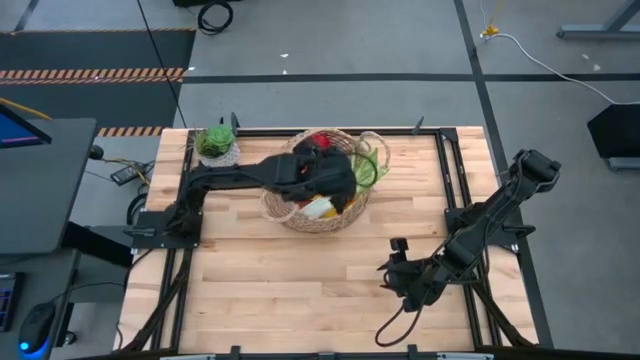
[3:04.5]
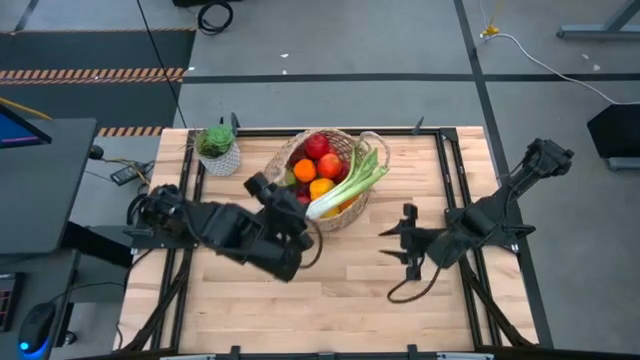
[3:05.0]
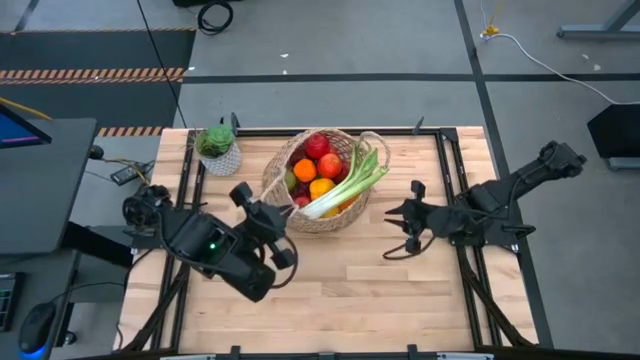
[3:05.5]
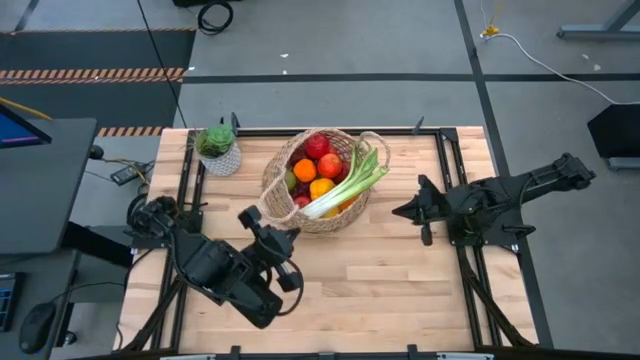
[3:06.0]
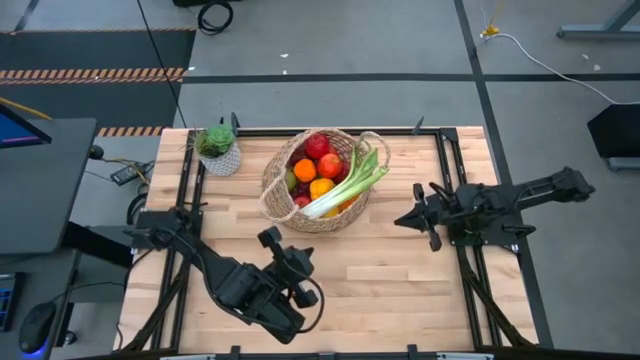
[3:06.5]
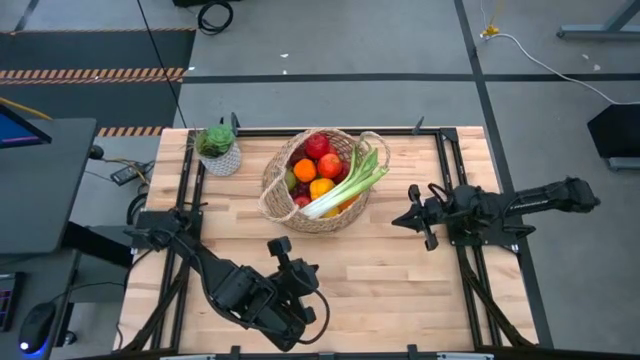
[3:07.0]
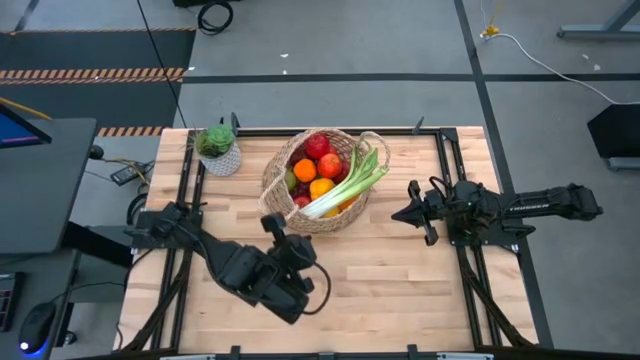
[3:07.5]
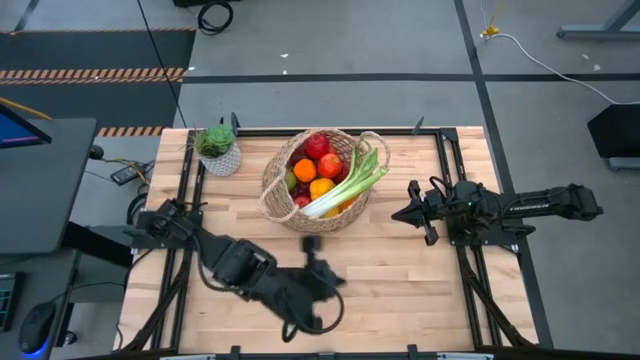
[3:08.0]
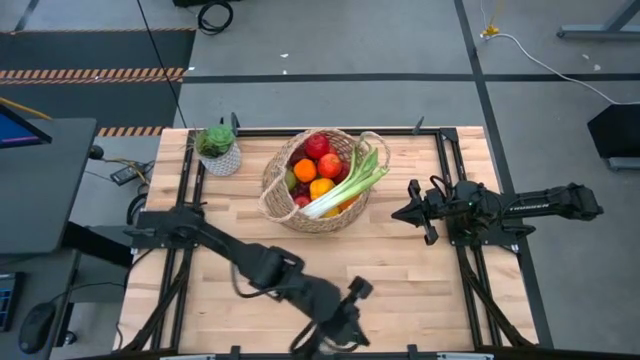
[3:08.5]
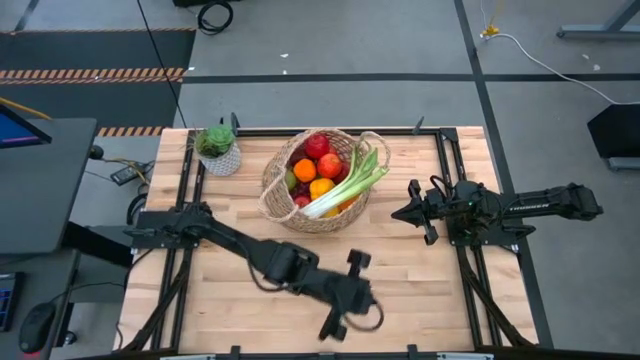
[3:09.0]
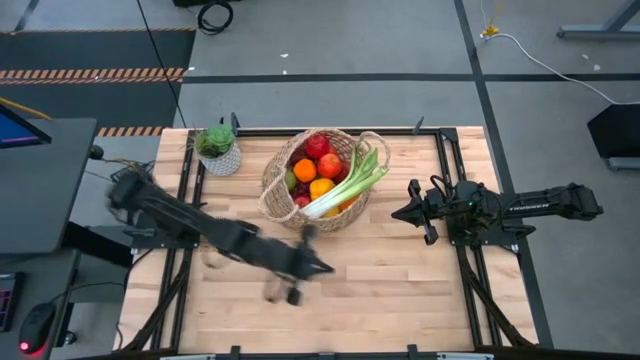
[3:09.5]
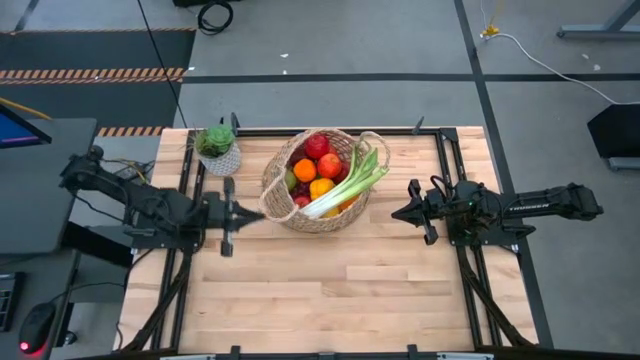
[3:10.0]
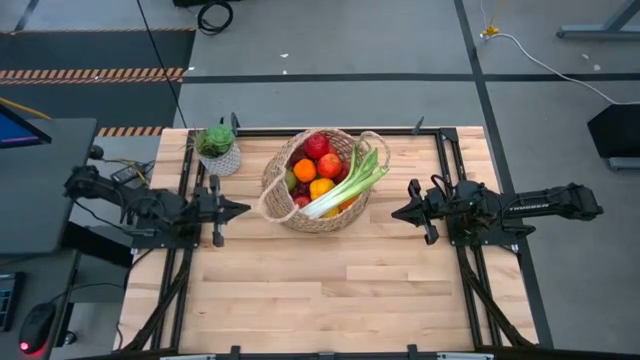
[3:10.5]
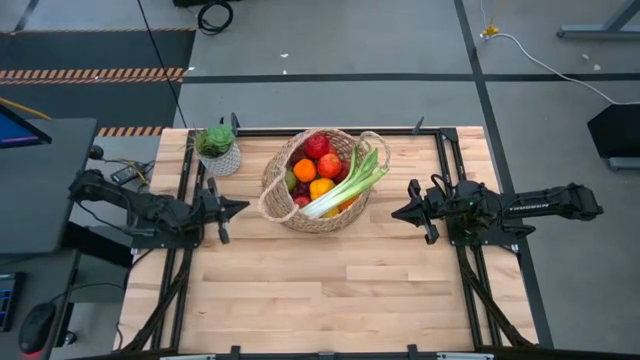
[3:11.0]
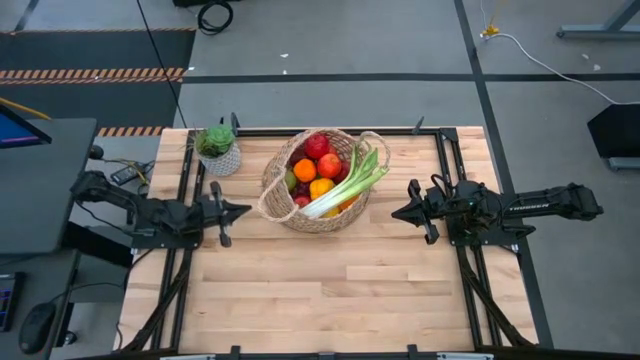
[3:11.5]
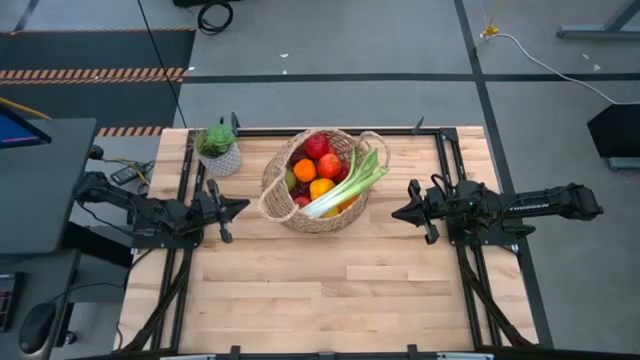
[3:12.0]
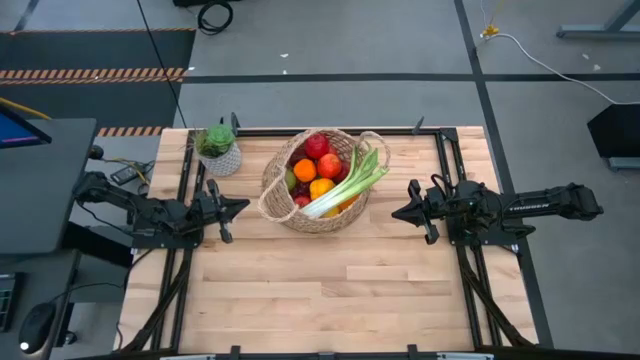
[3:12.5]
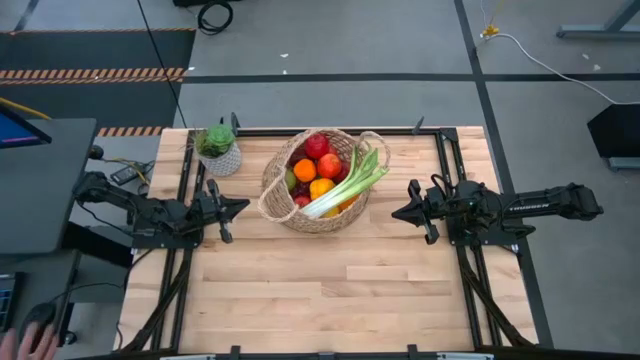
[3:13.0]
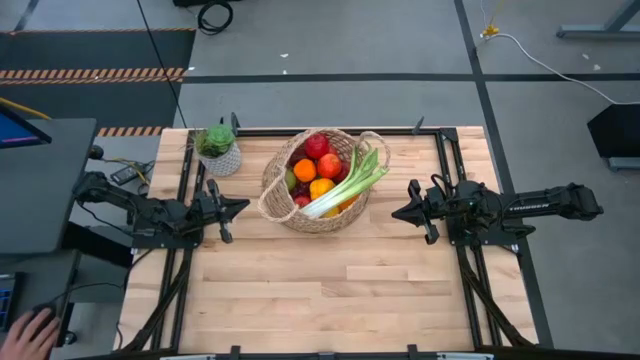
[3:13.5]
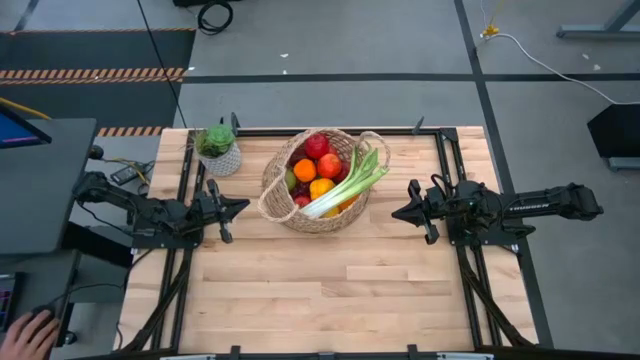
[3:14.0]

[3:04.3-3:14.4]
Task: Build produce basket
Return to Home Position

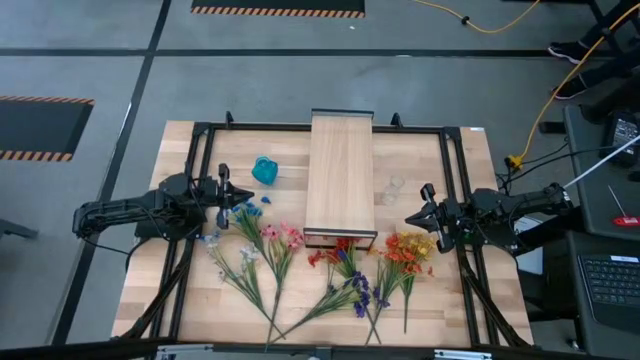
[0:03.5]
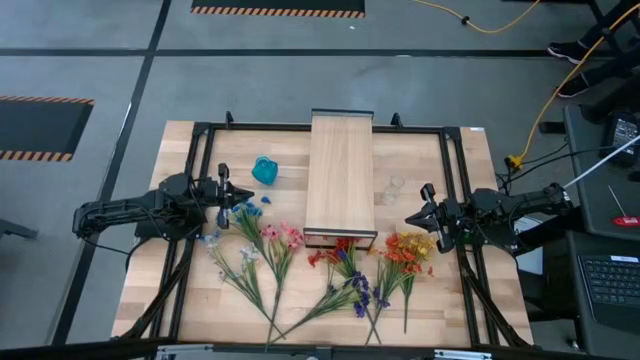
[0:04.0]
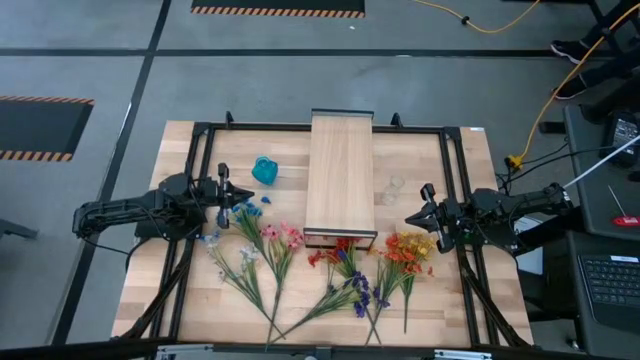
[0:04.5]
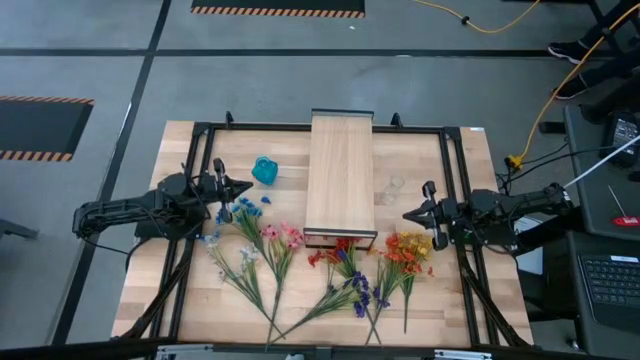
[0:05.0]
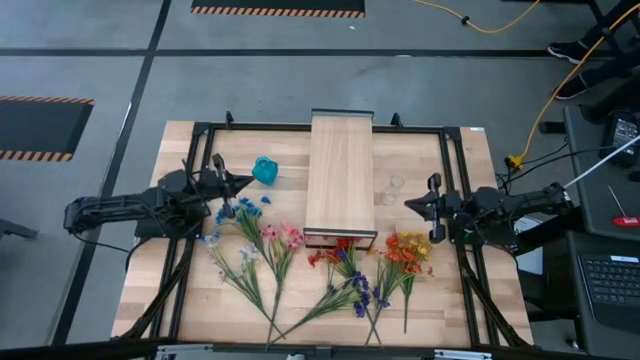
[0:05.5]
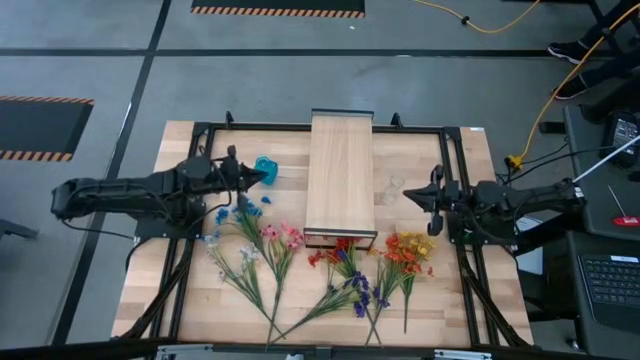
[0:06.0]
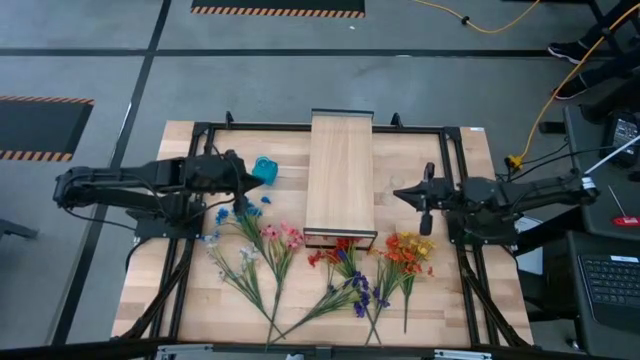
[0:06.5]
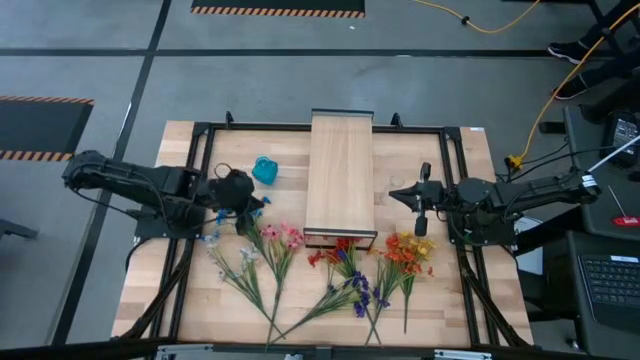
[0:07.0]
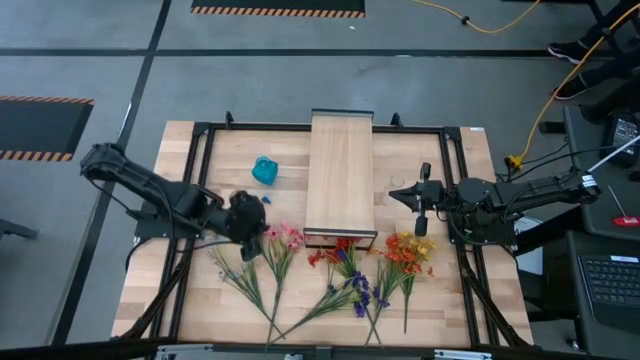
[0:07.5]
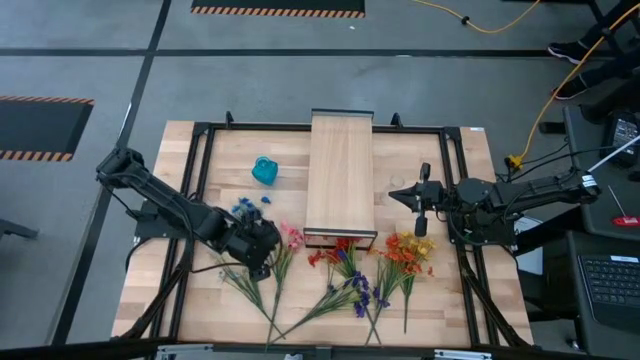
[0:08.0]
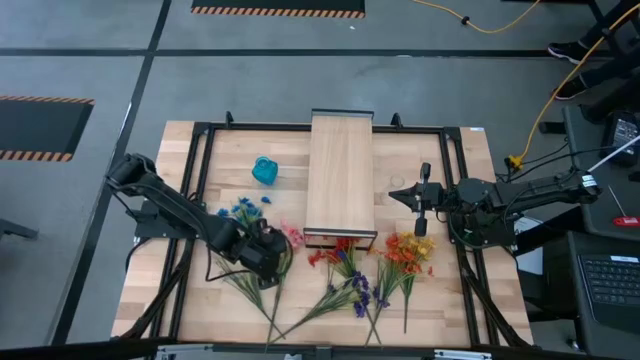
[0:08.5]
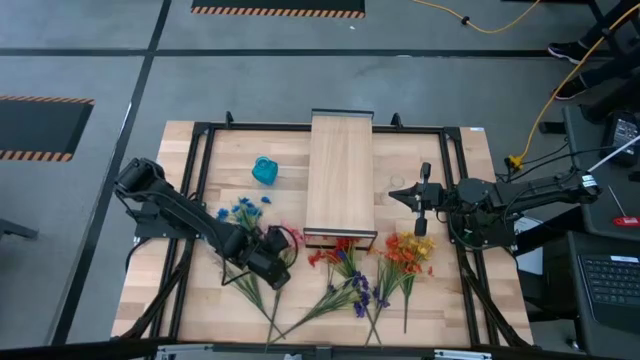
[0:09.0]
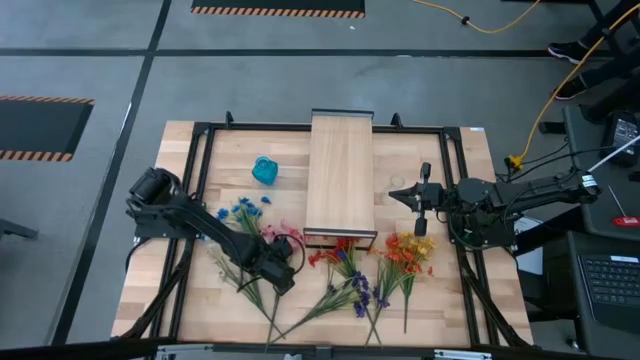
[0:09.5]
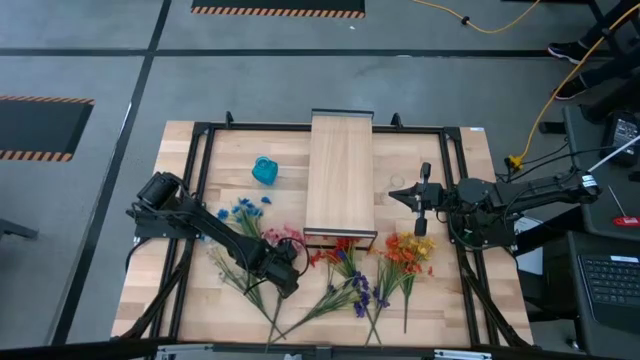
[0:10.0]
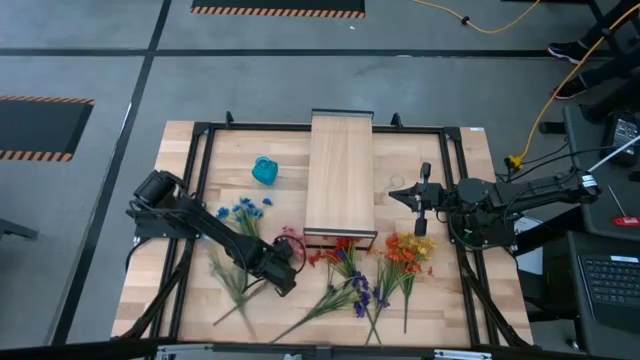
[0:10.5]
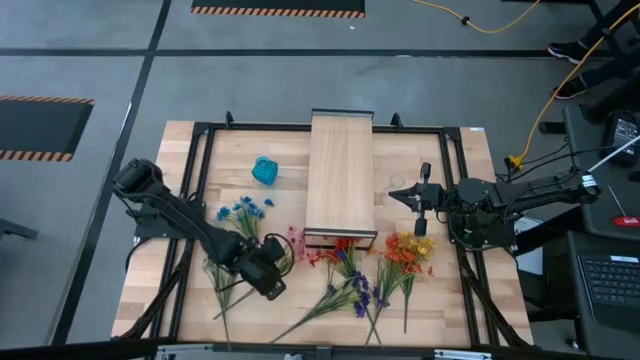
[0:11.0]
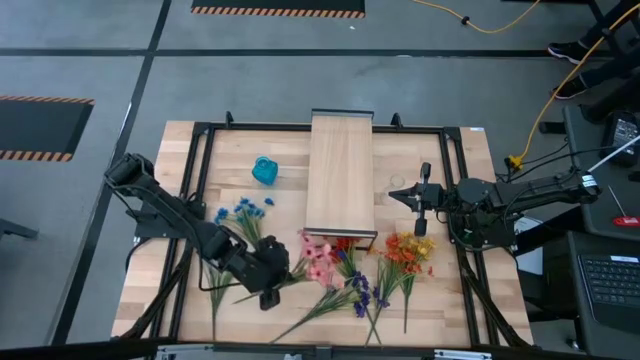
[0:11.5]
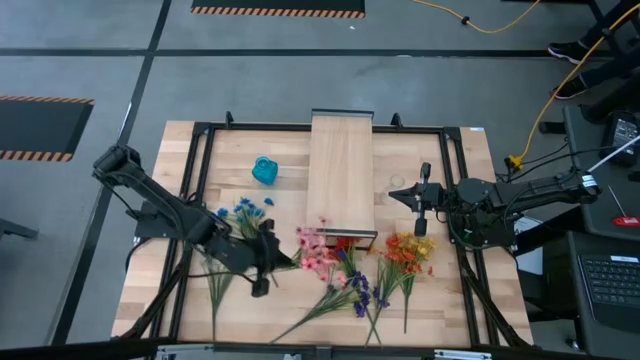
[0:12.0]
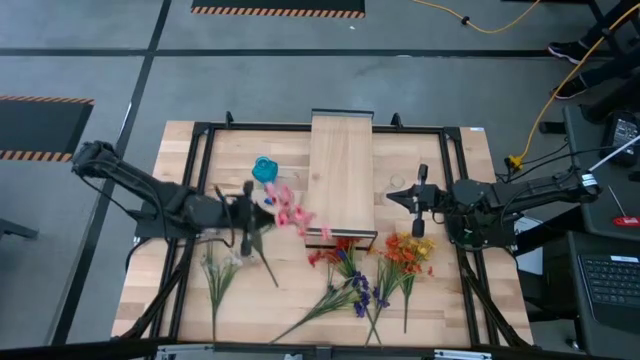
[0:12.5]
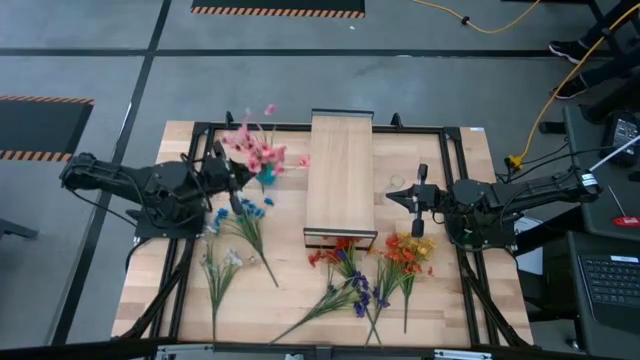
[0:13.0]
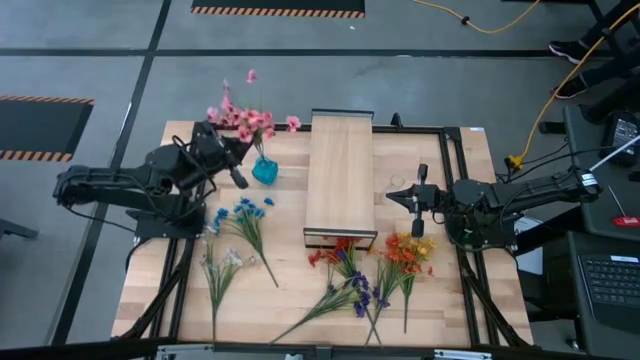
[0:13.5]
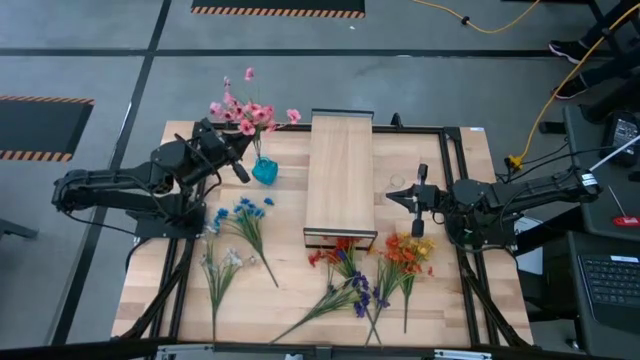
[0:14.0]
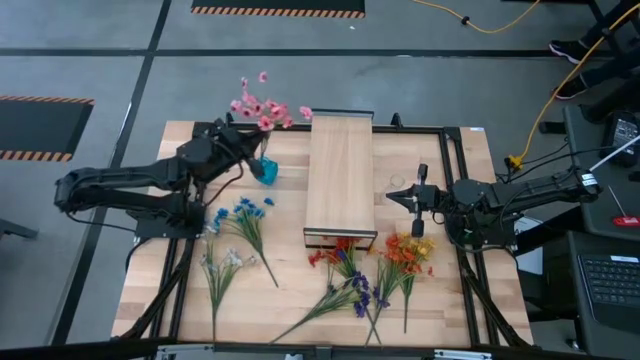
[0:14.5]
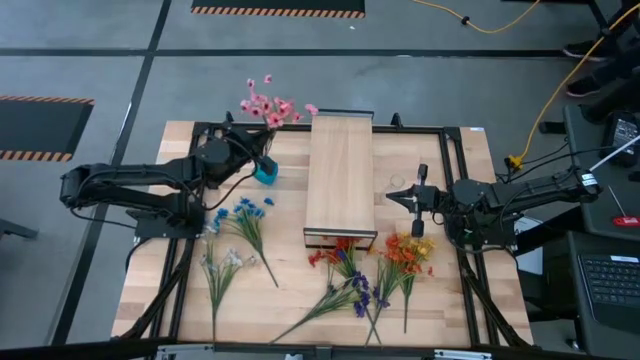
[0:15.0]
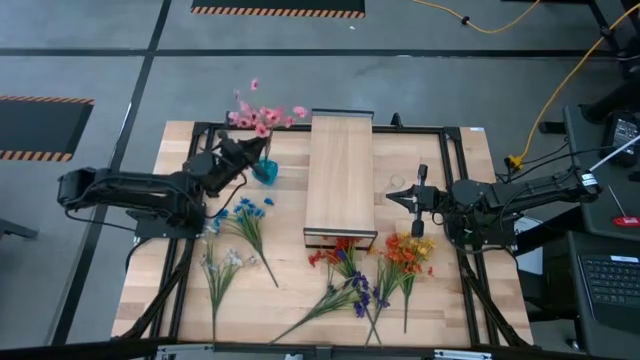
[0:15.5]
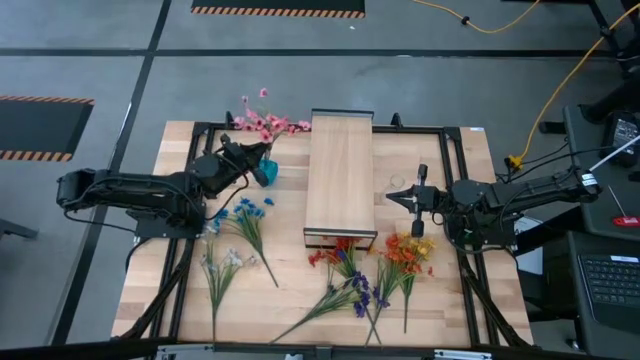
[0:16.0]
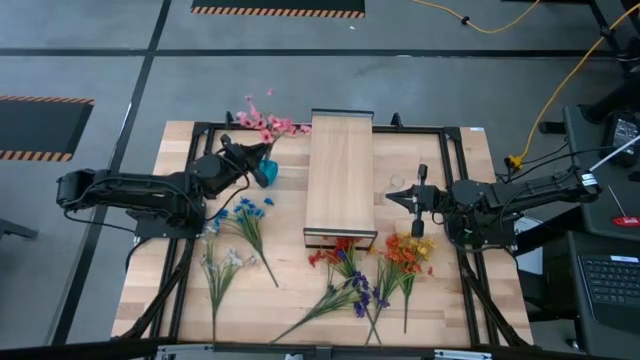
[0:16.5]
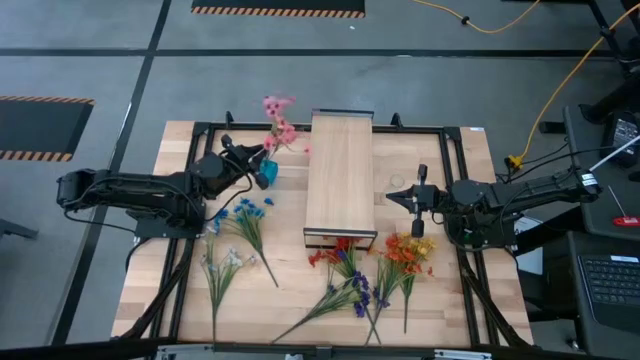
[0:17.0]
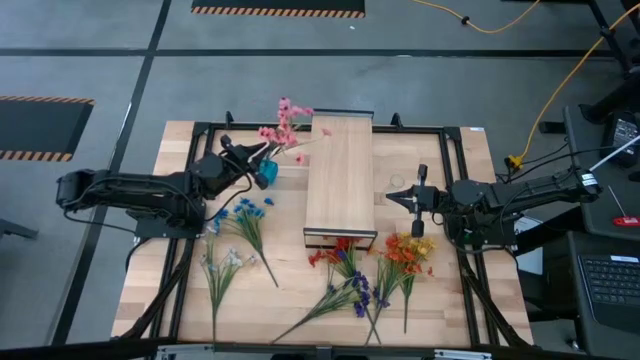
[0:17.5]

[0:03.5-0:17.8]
Task: Pick and place flowers into a vace then onto a shelf
Put the pink flowers into the blue vase
